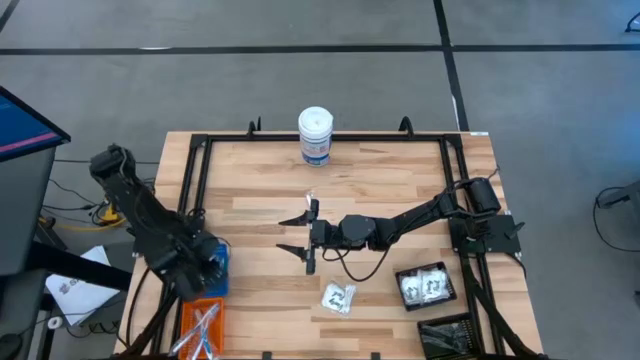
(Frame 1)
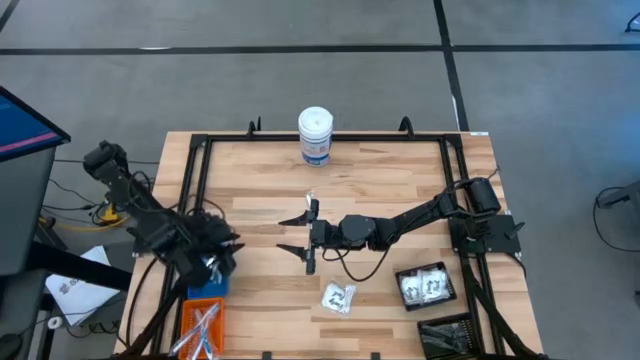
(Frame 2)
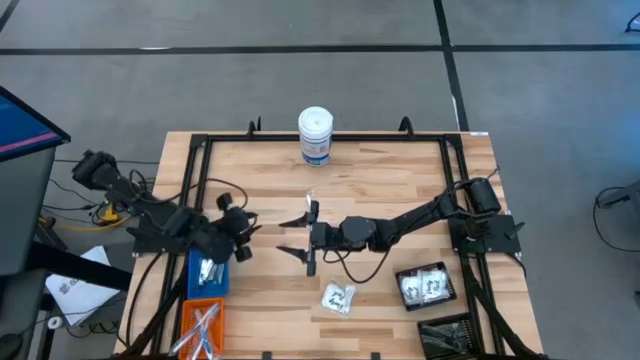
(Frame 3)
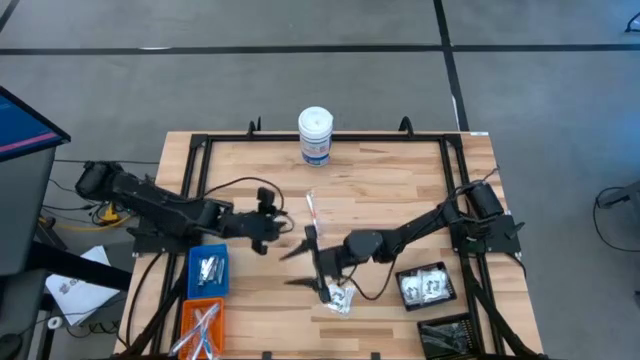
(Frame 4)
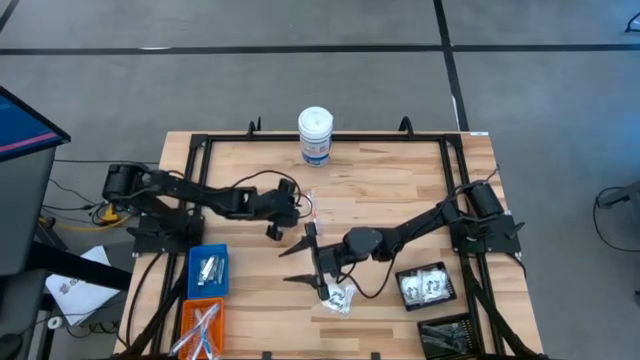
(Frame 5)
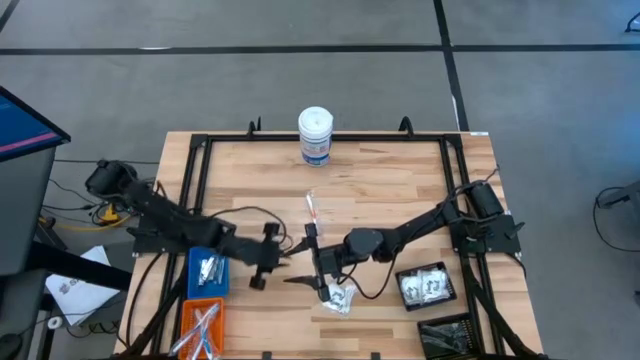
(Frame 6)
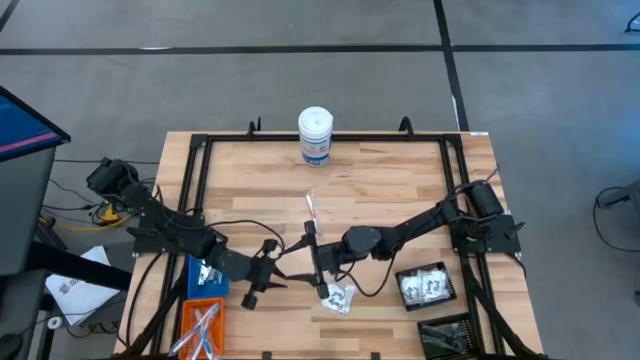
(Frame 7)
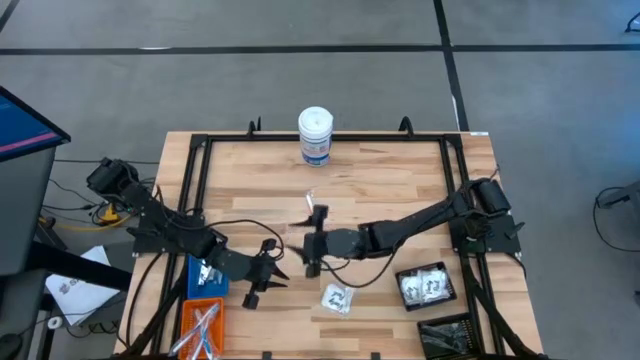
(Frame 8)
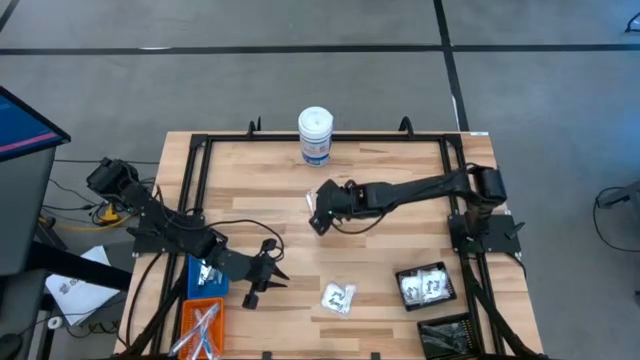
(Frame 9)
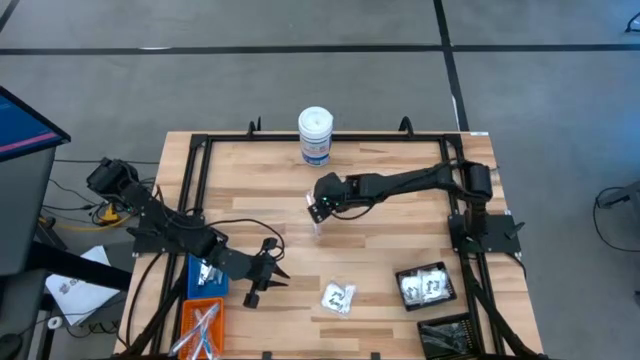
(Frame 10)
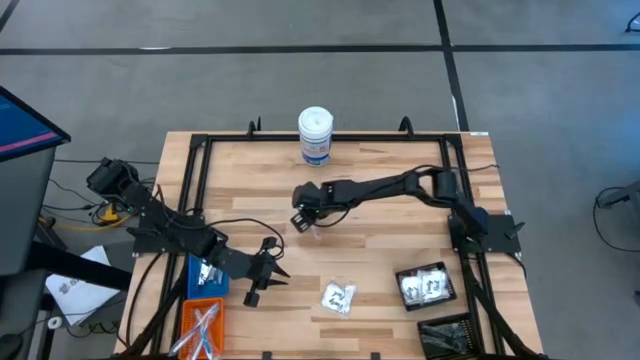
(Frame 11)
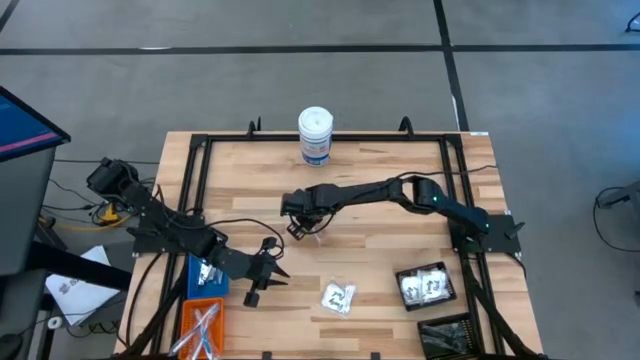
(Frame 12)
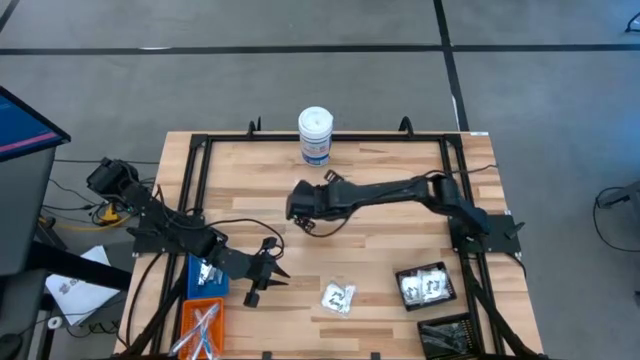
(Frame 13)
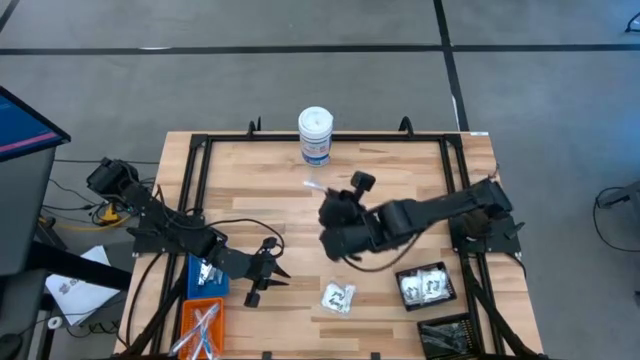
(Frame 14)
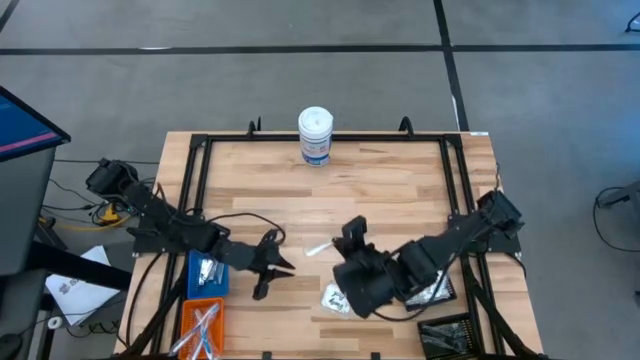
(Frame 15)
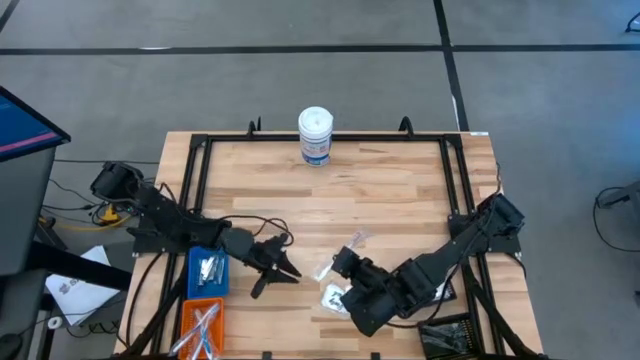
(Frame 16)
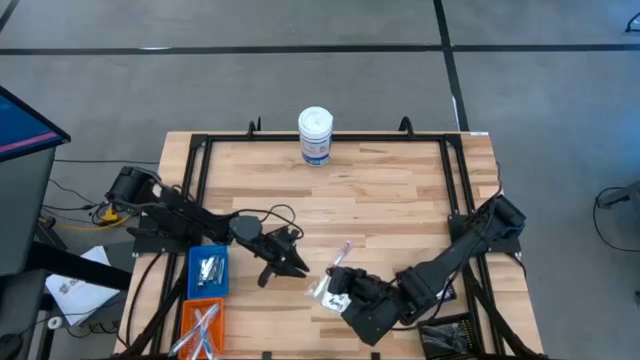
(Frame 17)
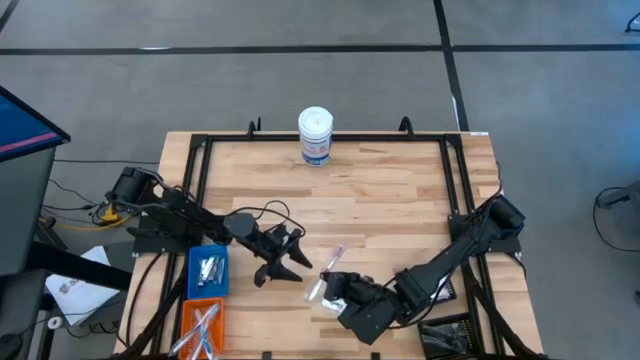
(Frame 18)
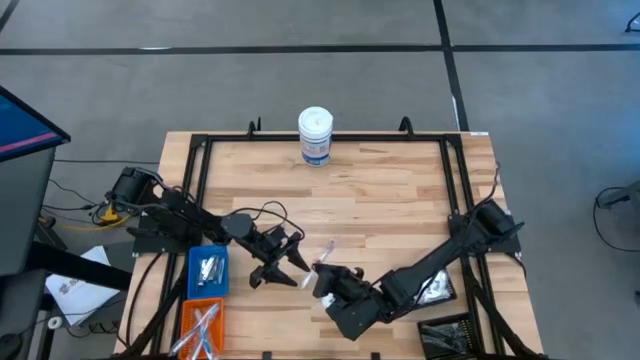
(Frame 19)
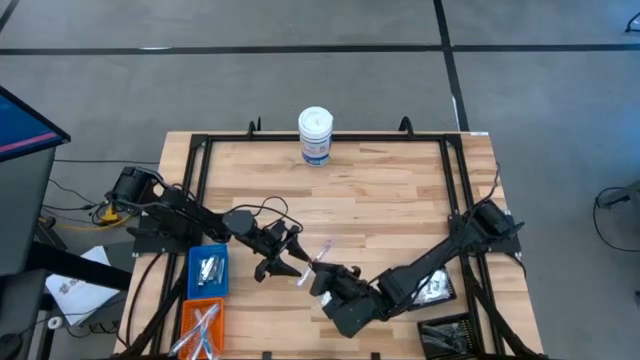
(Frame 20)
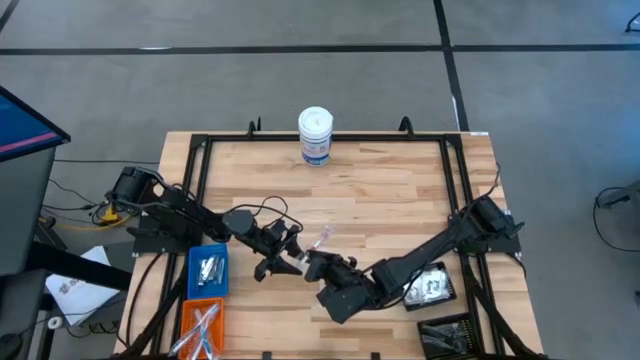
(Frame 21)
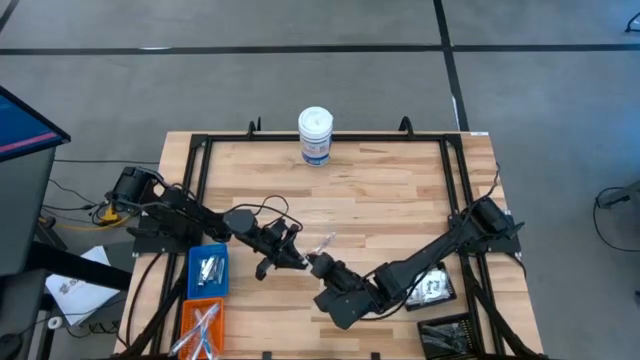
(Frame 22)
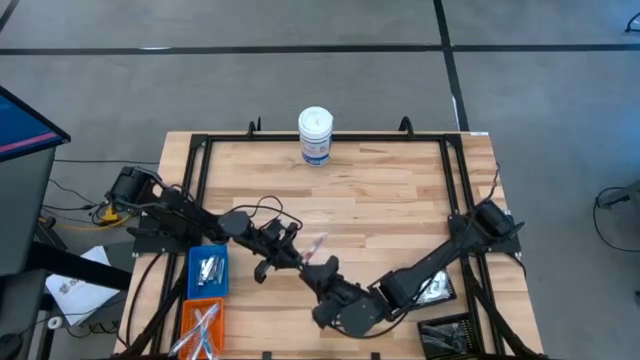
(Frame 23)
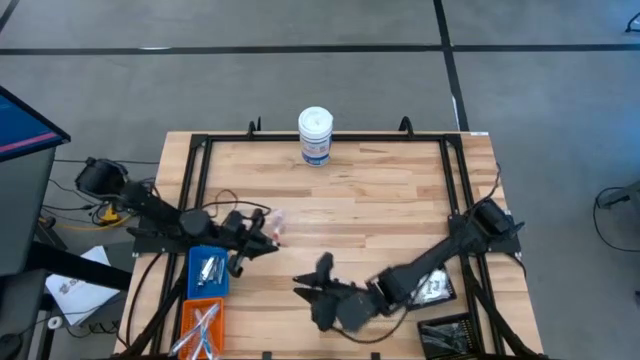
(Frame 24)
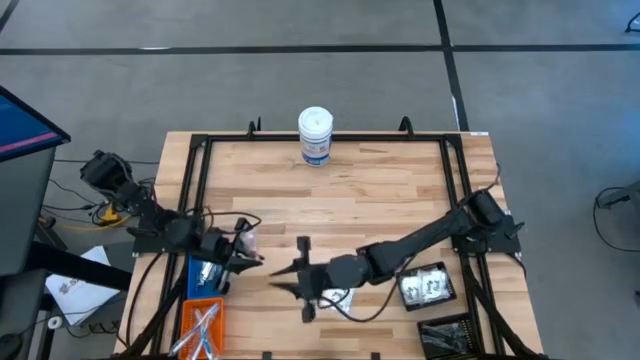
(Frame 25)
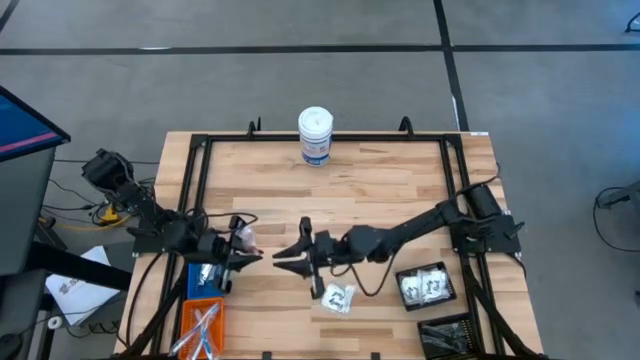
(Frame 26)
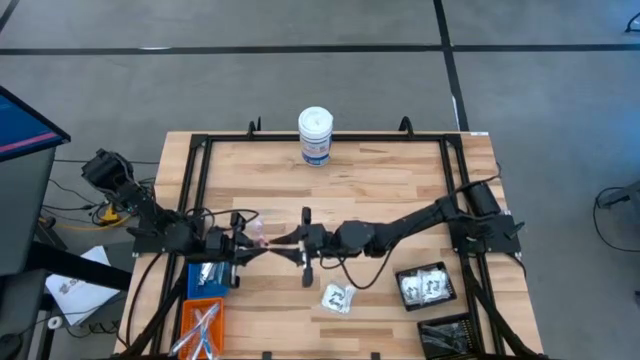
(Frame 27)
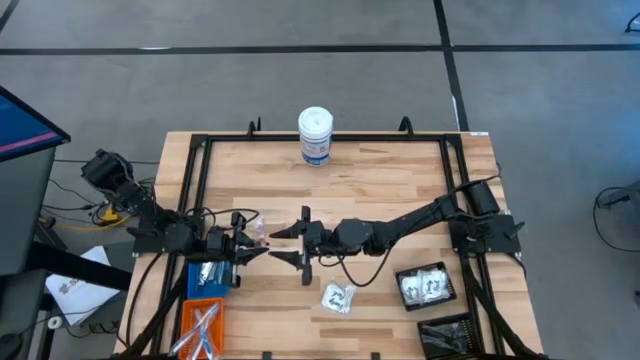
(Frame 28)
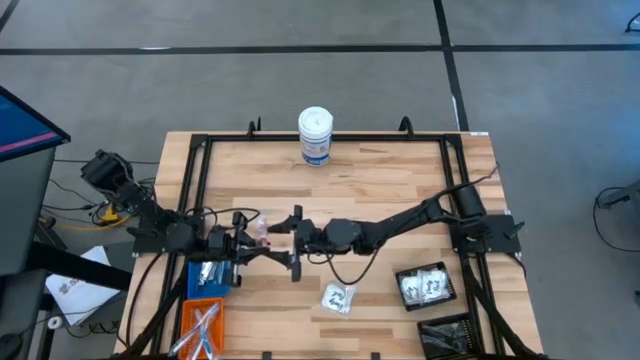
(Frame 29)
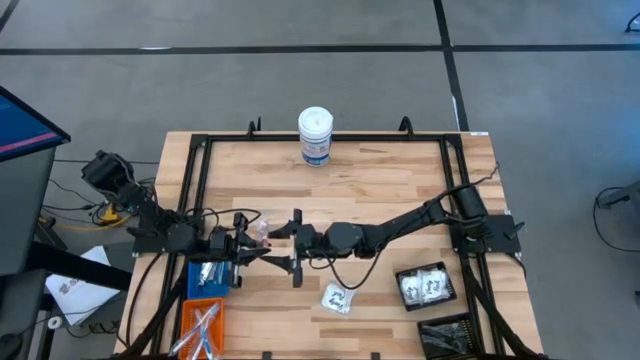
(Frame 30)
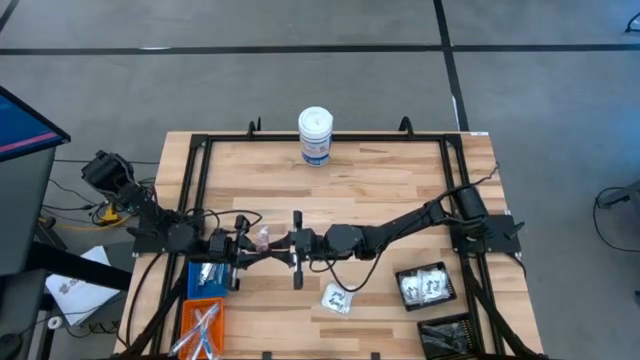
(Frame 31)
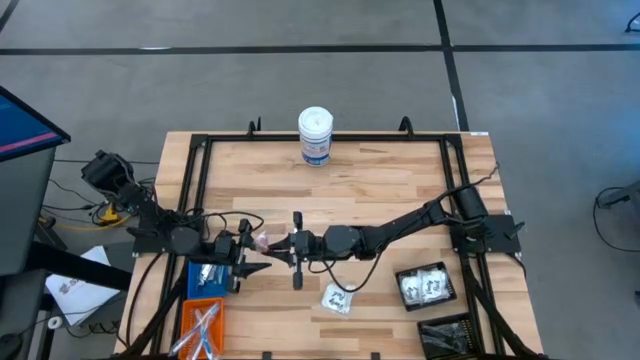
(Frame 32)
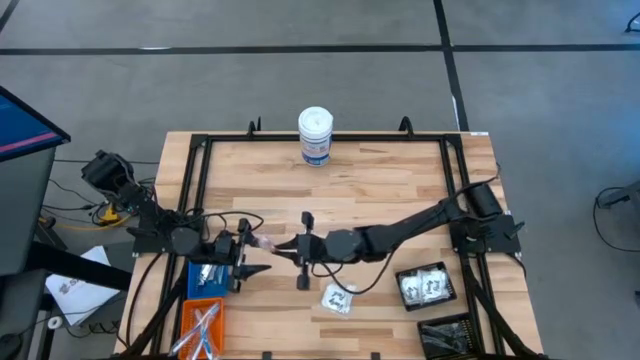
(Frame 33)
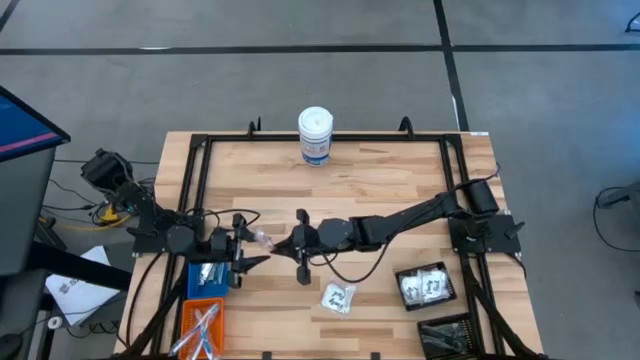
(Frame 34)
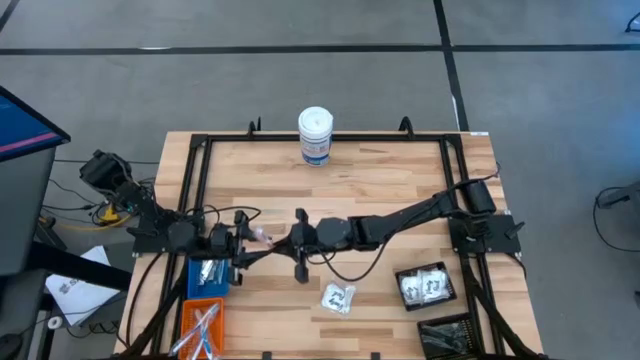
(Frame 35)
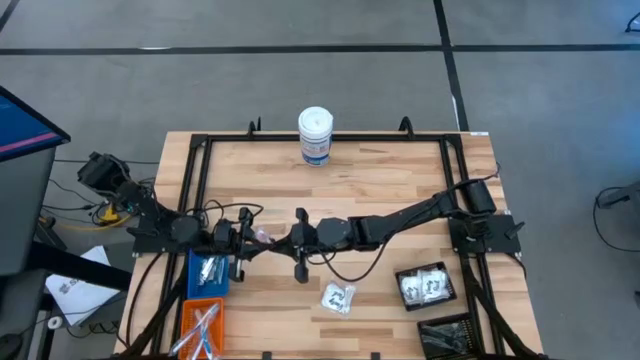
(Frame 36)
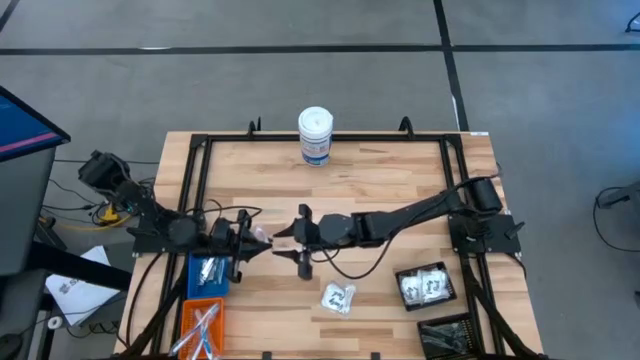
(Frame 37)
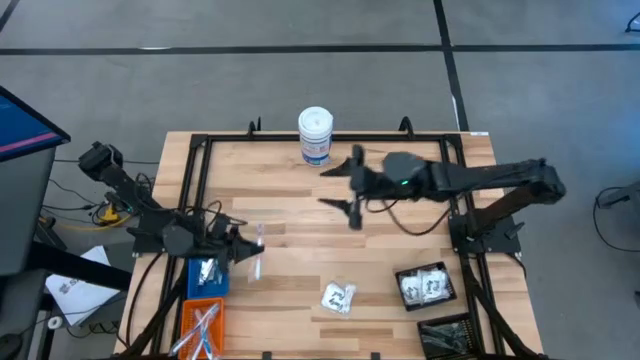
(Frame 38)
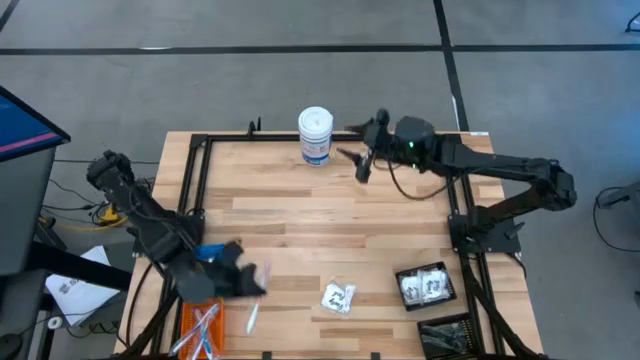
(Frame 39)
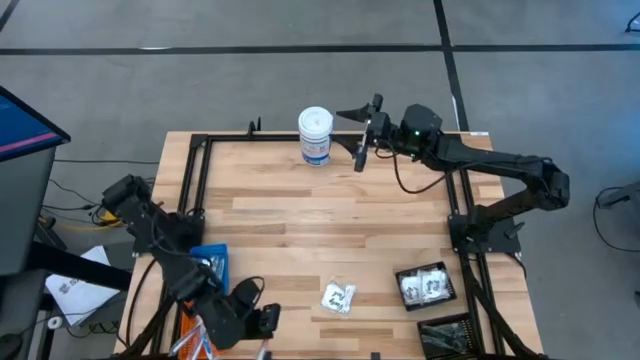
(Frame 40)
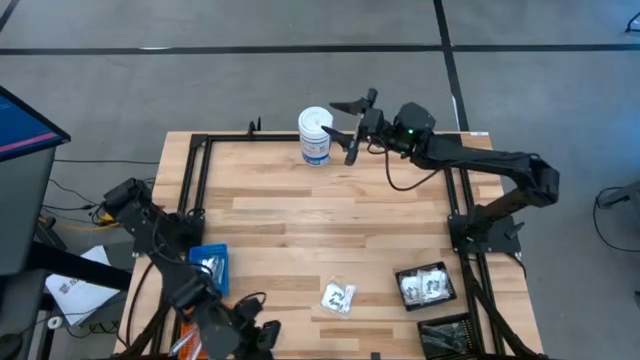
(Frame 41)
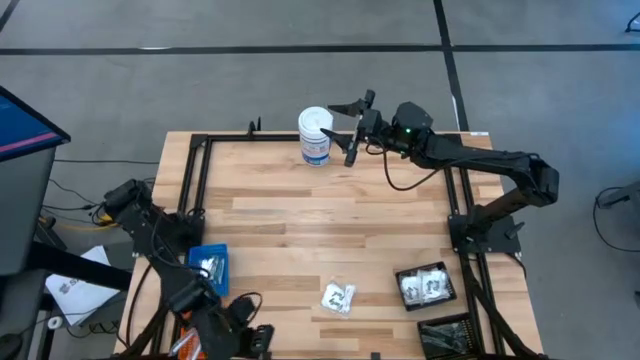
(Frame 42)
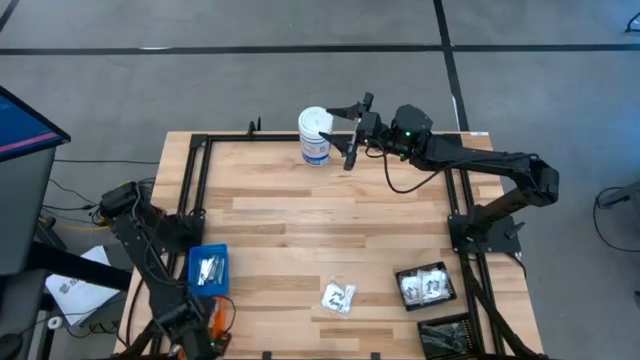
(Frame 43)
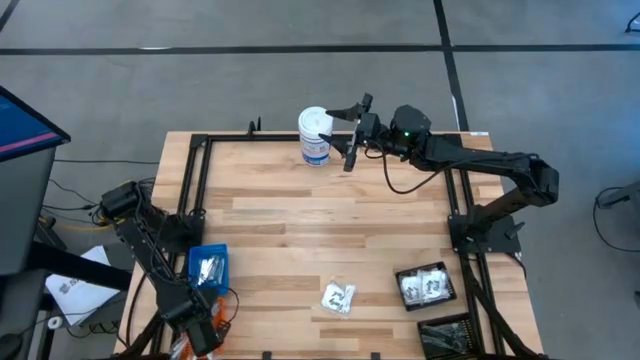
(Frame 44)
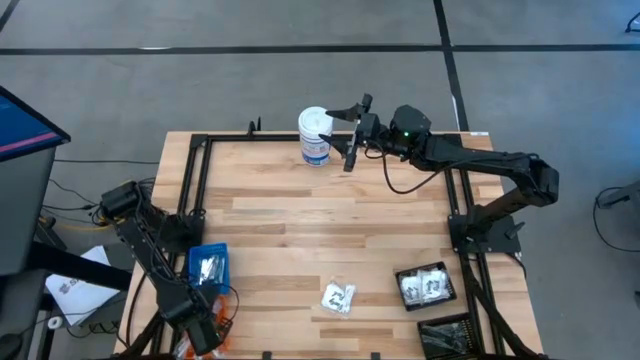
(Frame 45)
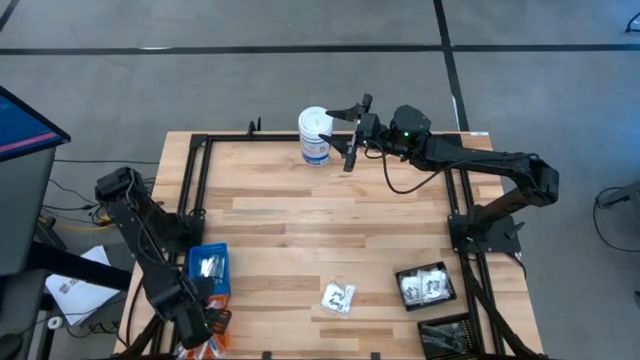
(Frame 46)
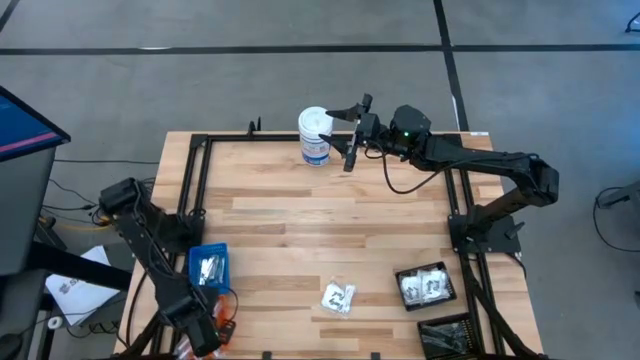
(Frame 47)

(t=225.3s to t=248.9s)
Task: Pick & Place Travel size toiletries
Put the orange toothbrush into the orange bin
